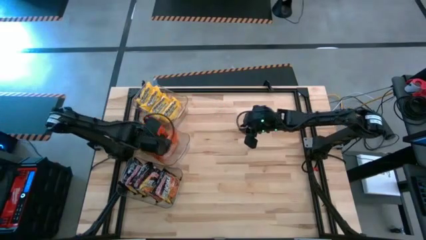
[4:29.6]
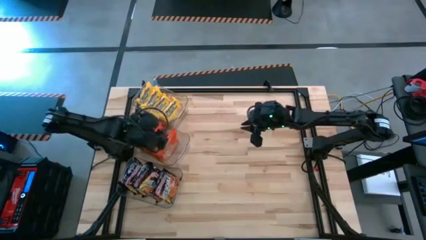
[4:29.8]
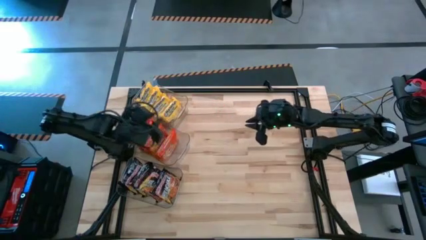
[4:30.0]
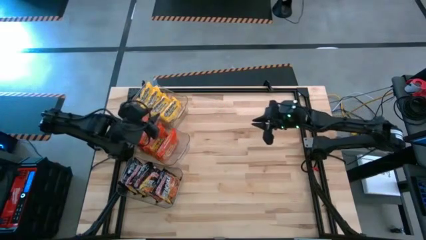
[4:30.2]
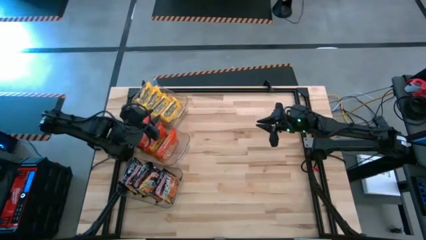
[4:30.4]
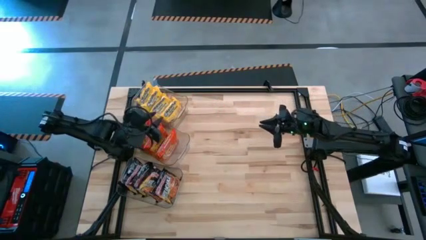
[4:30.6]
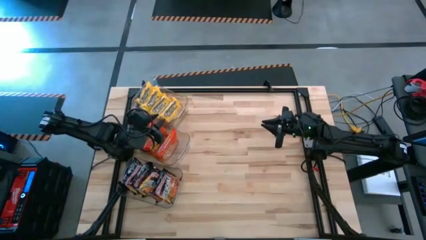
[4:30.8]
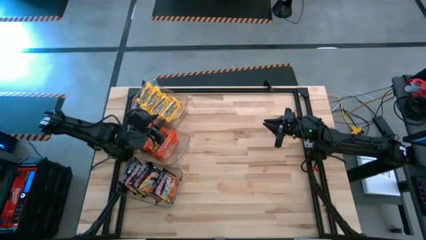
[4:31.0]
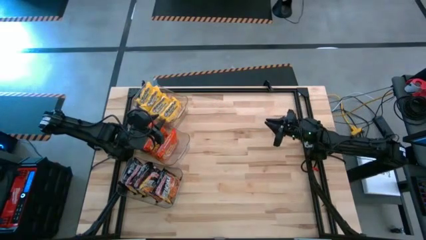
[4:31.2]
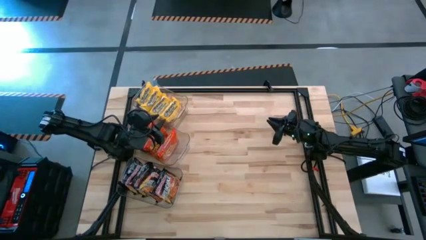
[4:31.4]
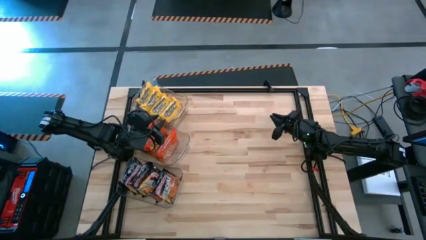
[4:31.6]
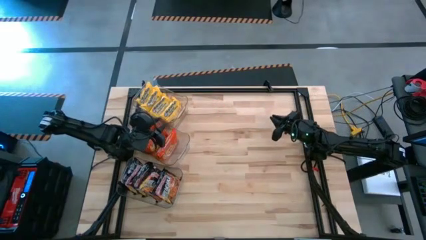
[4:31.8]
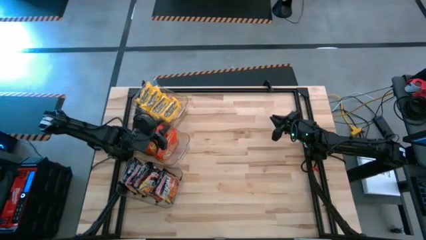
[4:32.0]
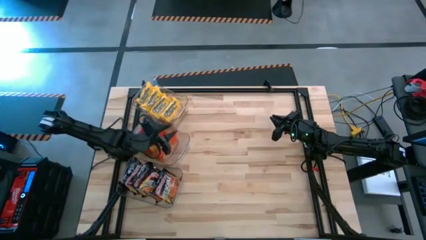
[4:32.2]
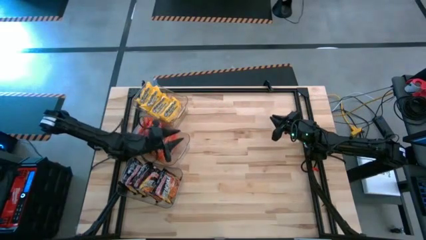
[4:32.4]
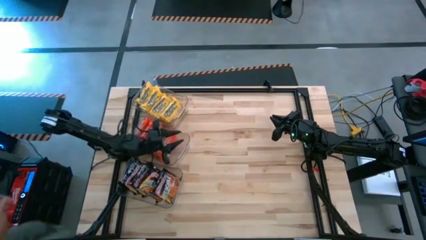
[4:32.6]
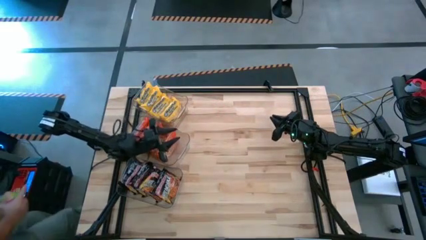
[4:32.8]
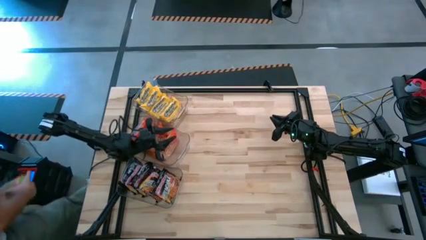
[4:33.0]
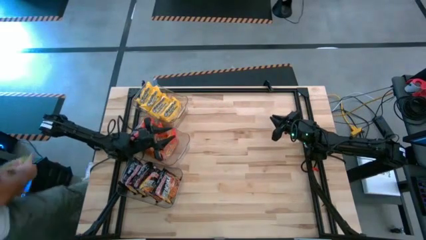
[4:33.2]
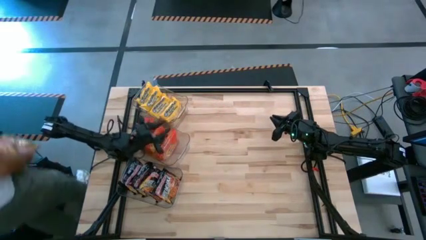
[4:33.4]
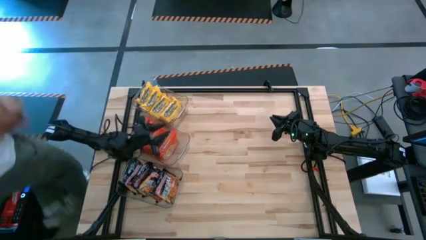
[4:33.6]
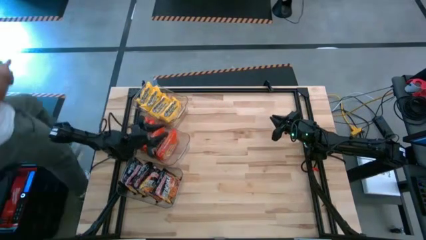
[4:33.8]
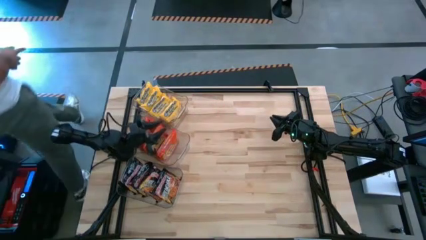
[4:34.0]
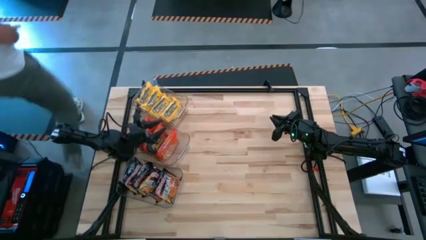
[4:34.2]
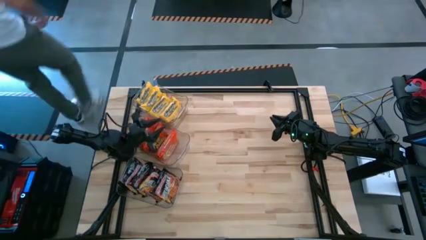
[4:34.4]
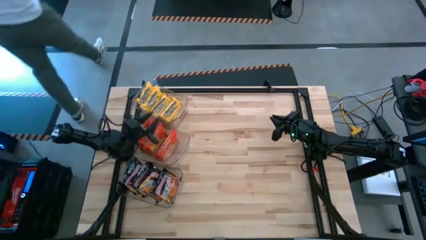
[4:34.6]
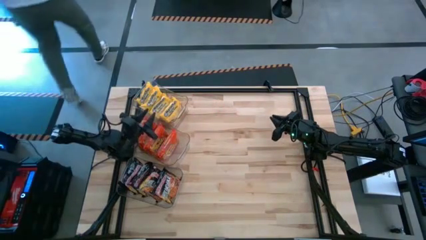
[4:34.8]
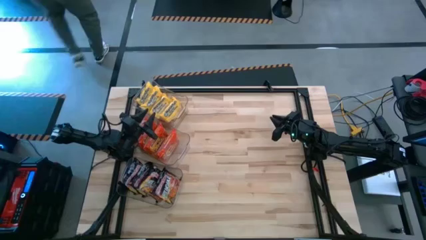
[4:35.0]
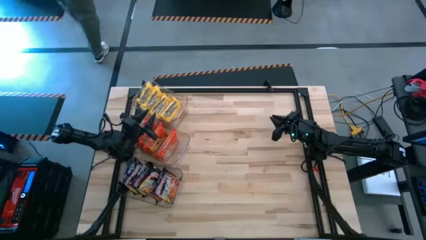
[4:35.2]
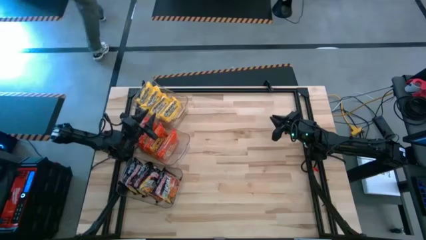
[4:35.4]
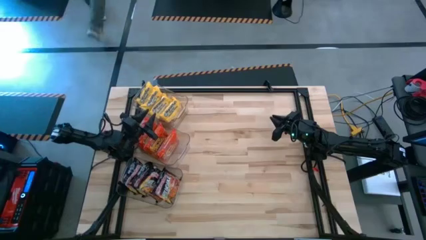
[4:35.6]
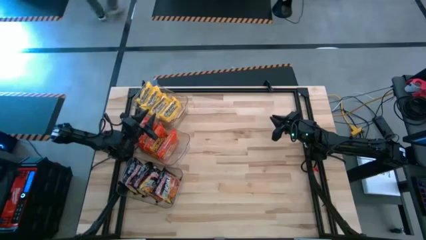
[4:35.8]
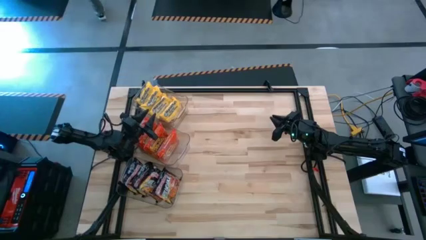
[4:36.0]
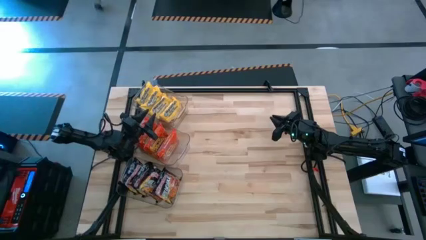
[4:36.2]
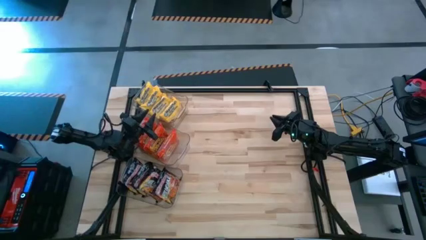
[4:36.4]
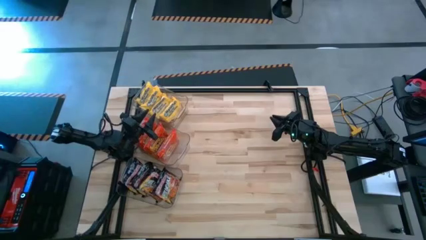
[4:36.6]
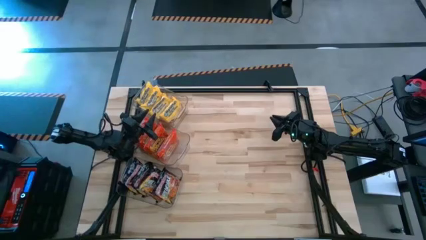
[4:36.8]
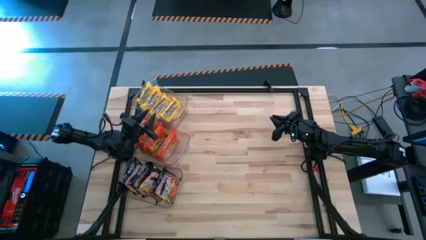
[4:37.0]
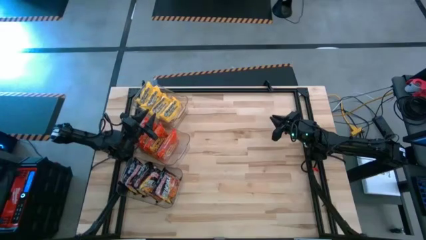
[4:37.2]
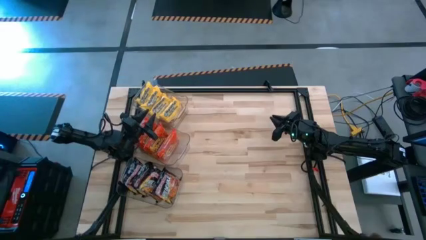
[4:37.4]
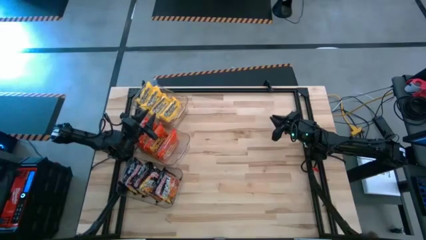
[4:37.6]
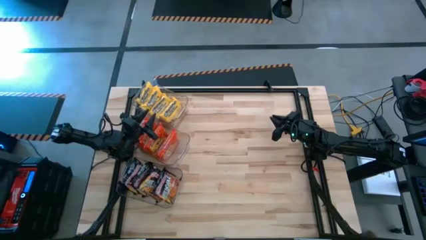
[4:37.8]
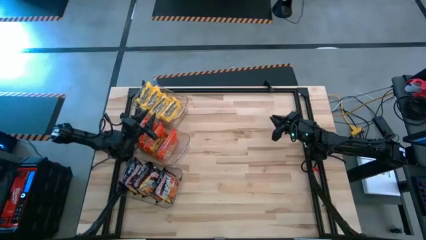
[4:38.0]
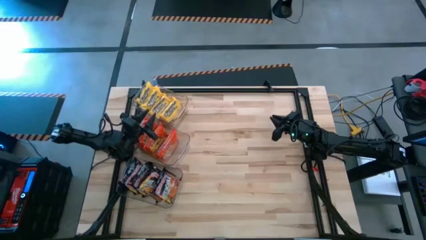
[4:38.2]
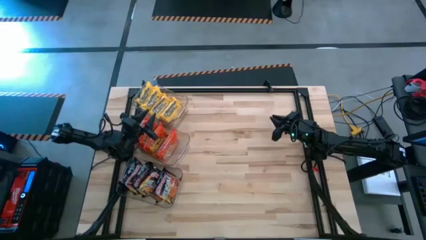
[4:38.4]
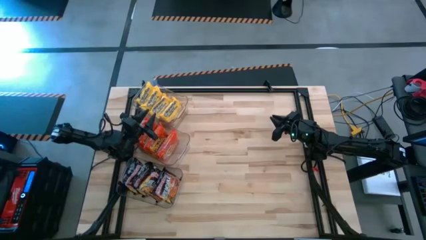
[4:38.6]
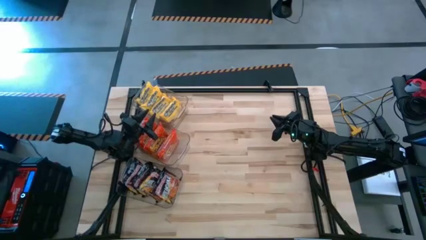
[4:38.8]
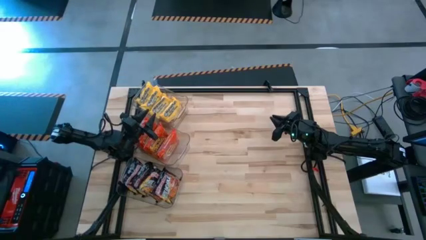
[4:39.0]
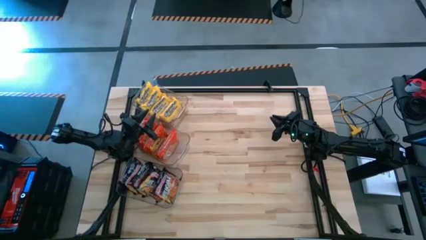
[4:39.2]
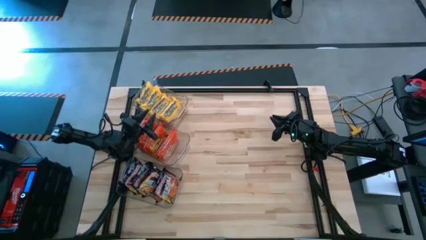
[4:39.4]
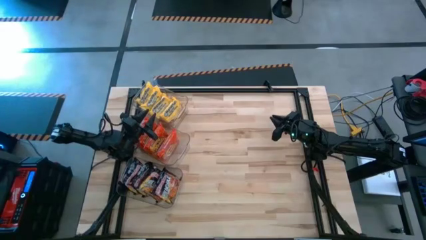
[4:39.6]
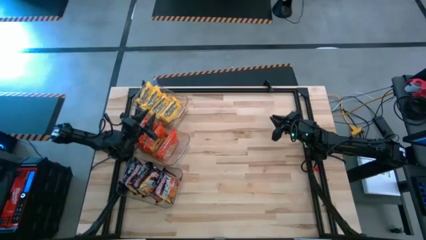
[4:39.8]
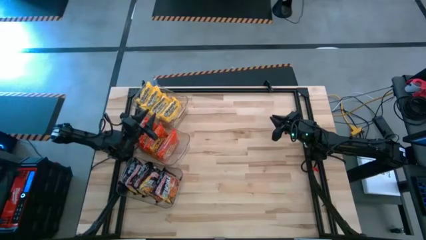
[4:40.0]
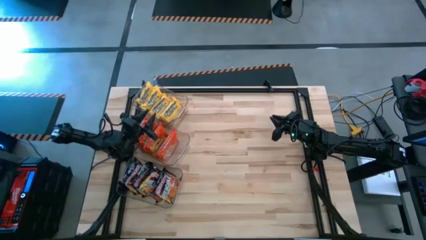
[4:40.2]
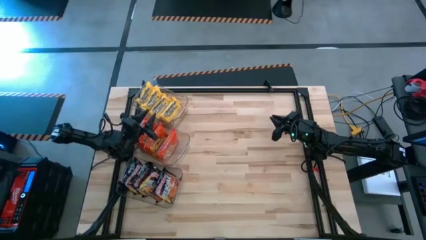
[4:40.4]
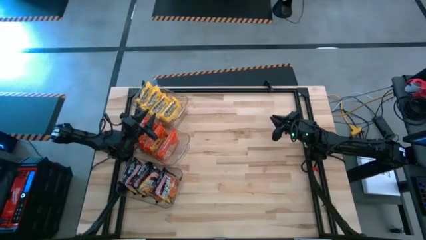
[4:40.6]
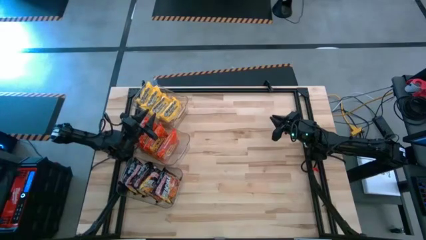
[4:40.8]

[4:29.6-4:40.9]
Task: Sort Maruchan noodles
Return to Home Position
